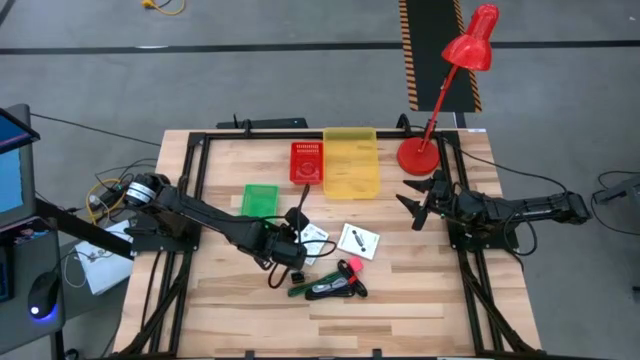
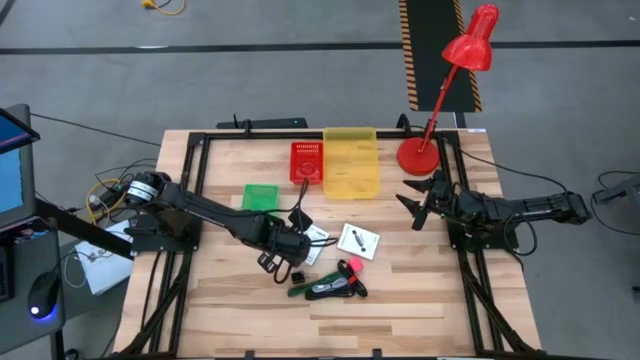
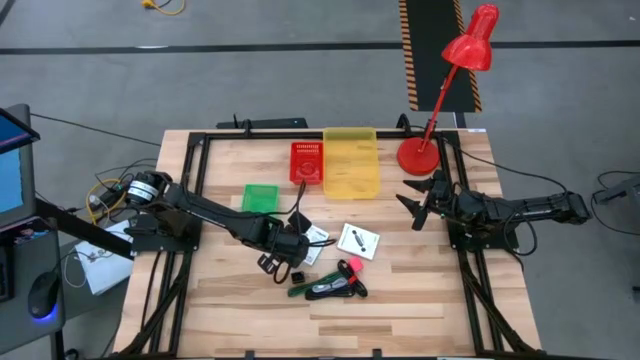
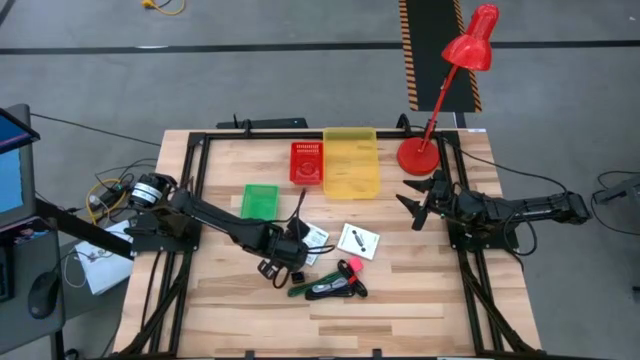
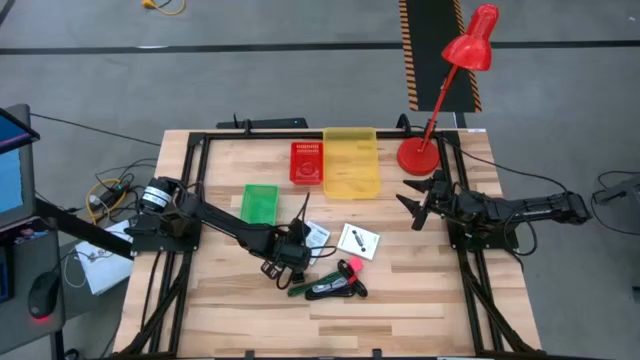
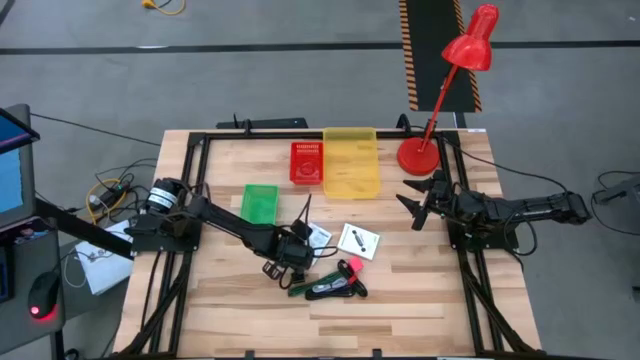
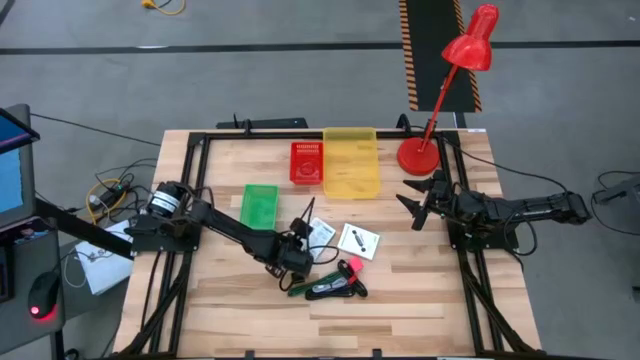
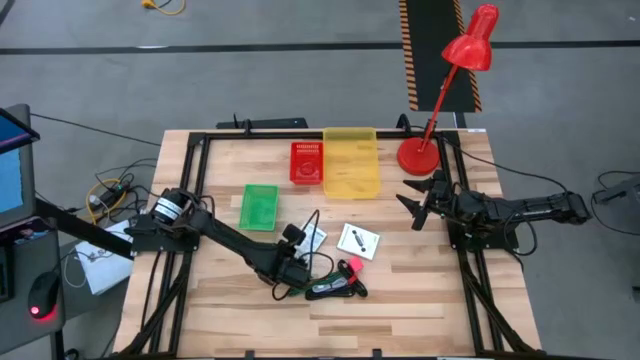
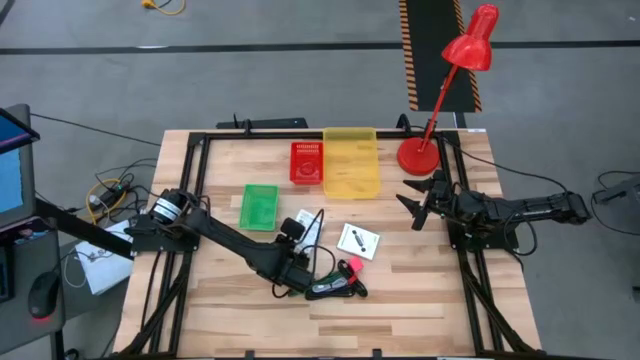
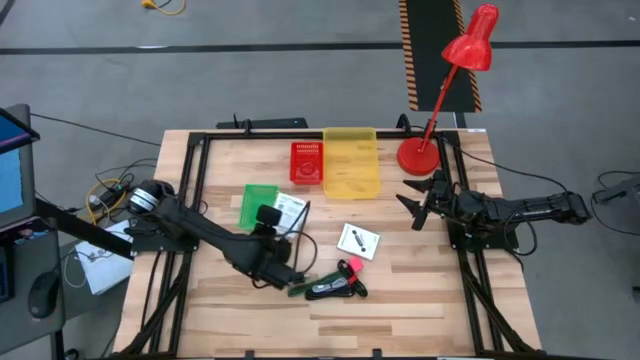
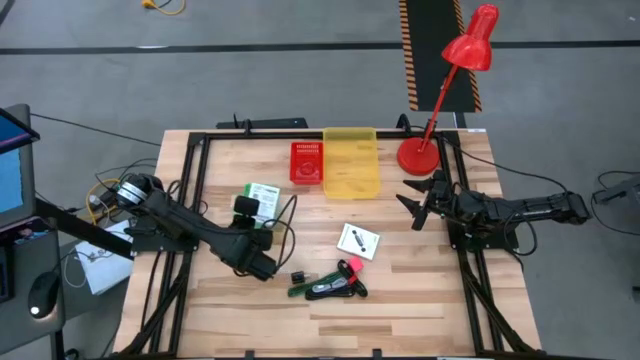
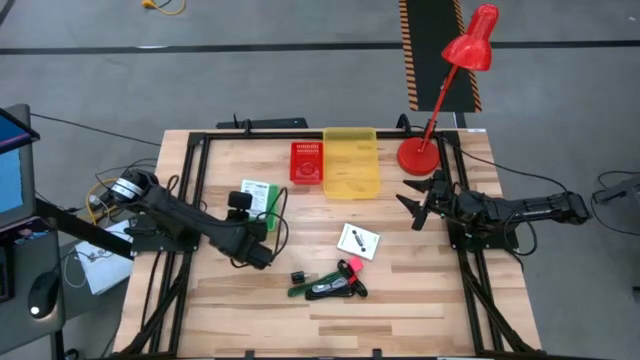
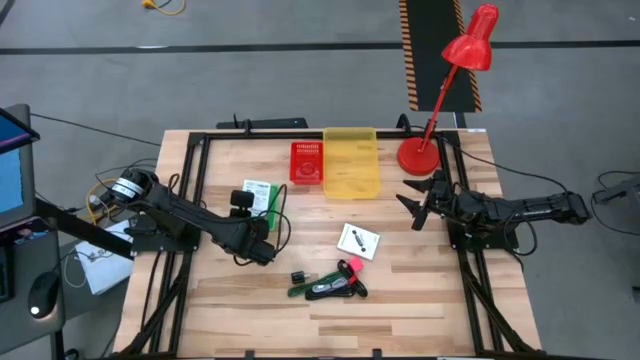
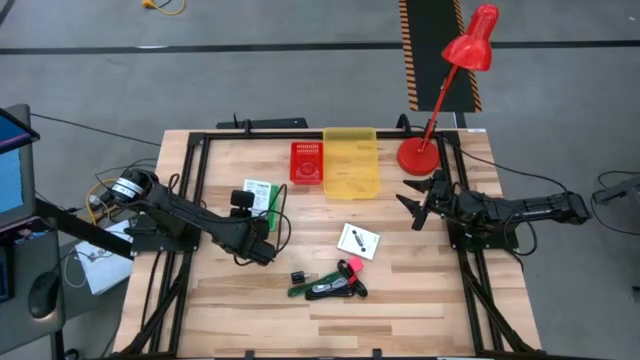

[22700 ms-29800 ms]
Task: Pick and place items into bin
Put the left white card reader box into the green basket

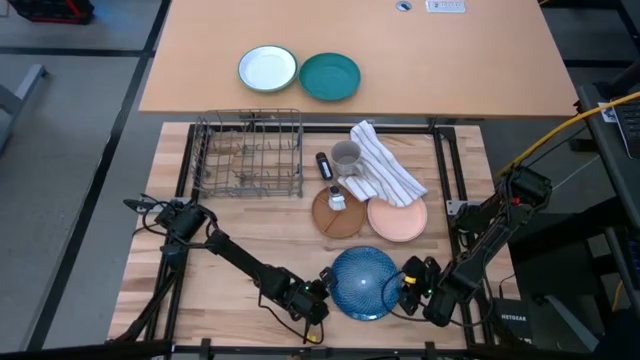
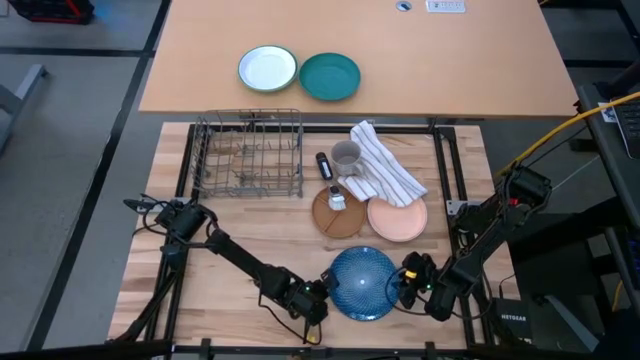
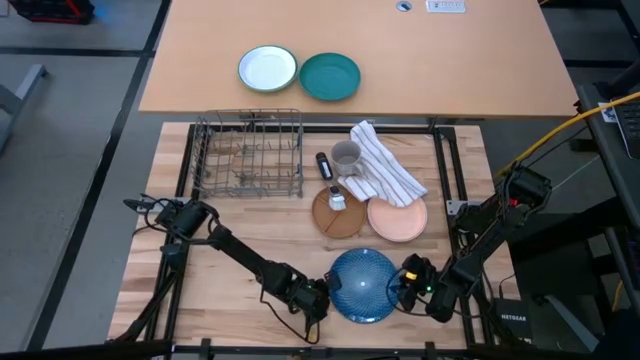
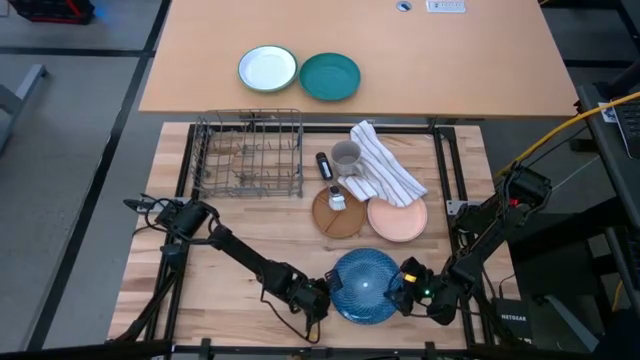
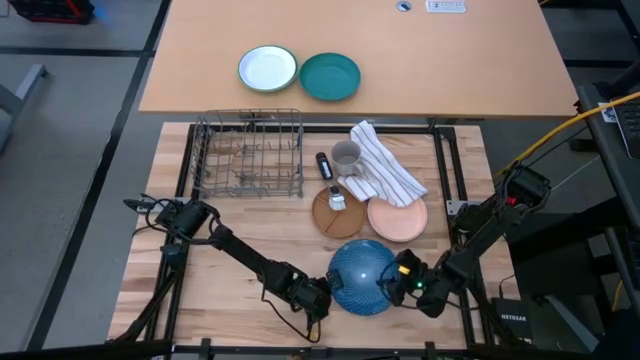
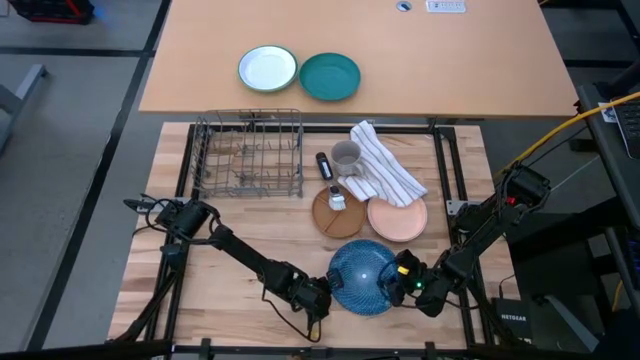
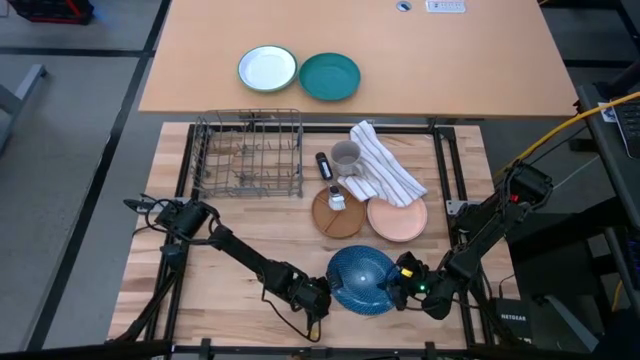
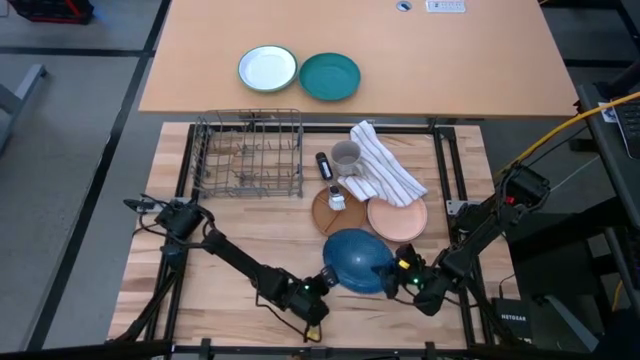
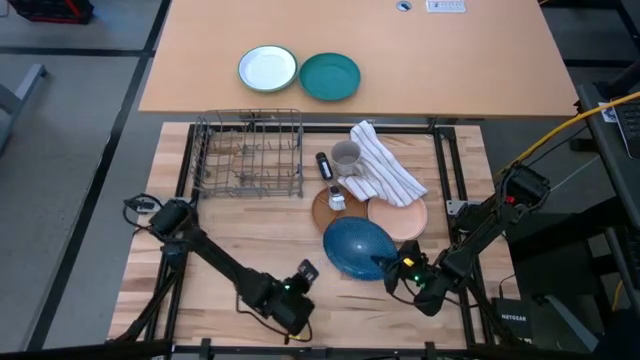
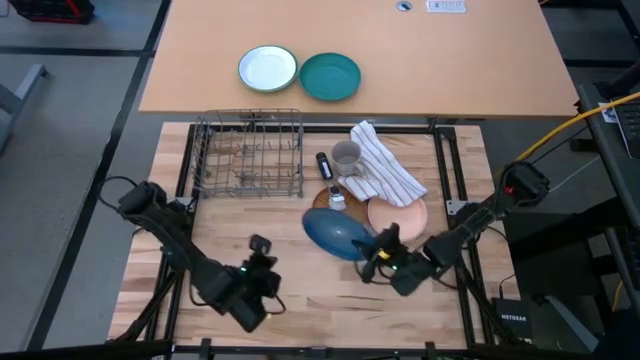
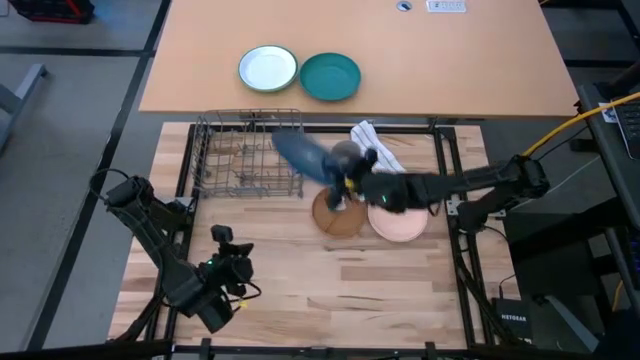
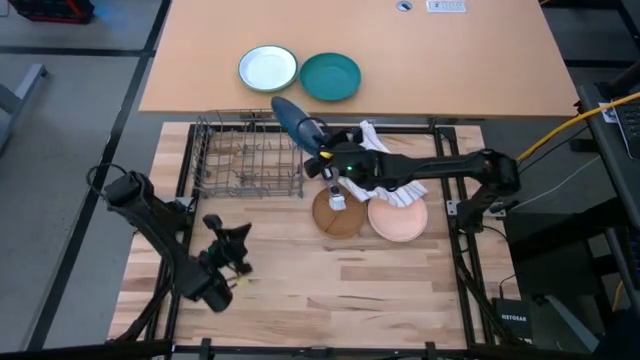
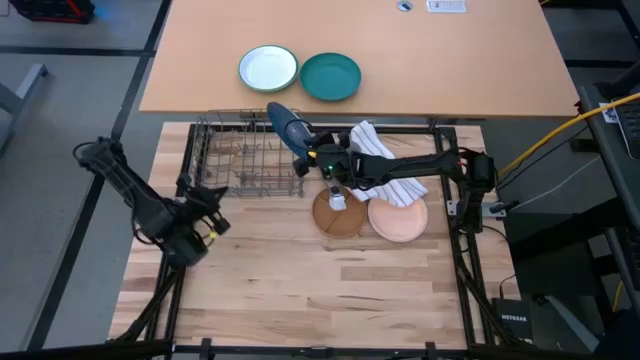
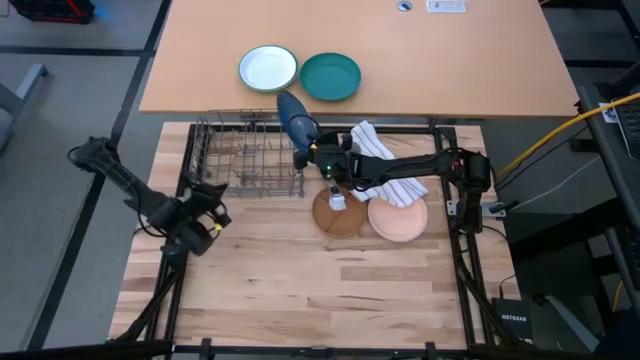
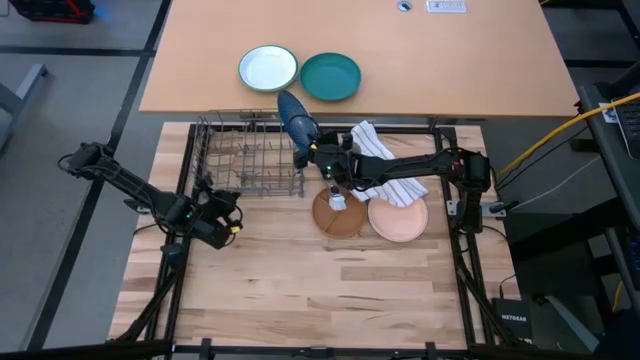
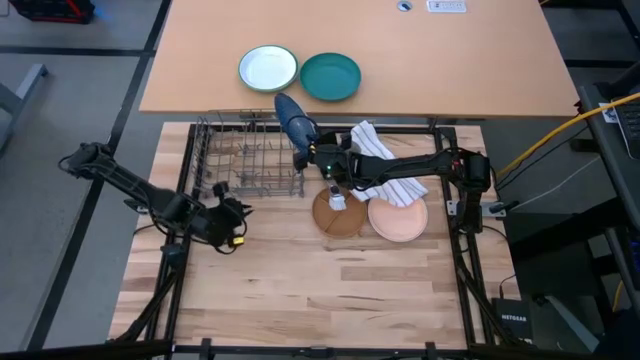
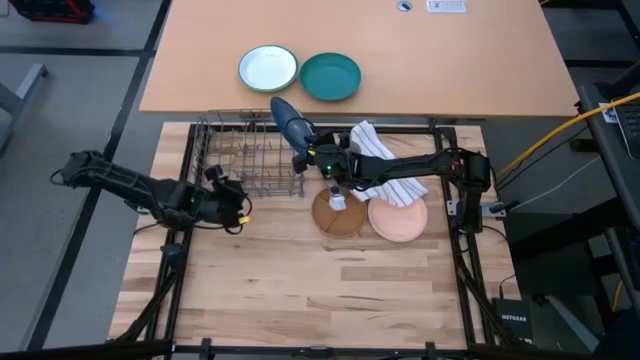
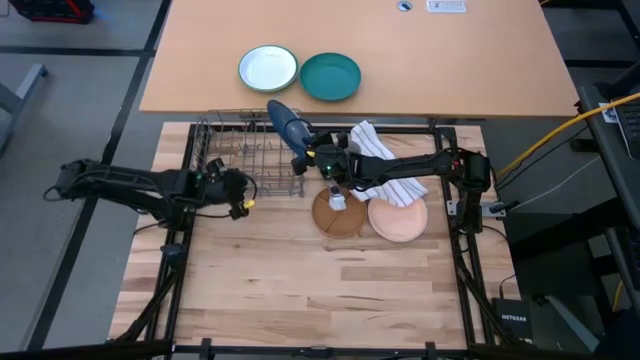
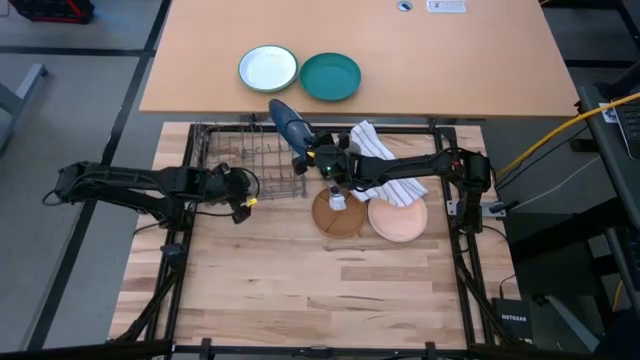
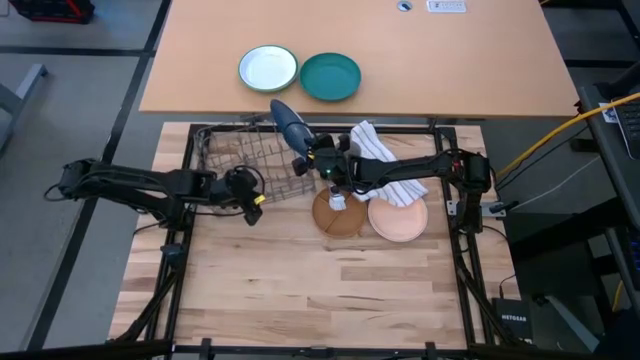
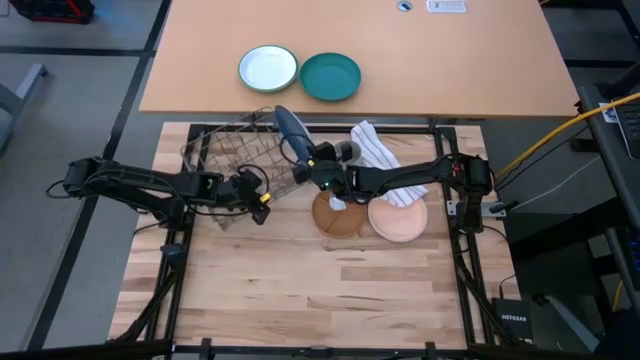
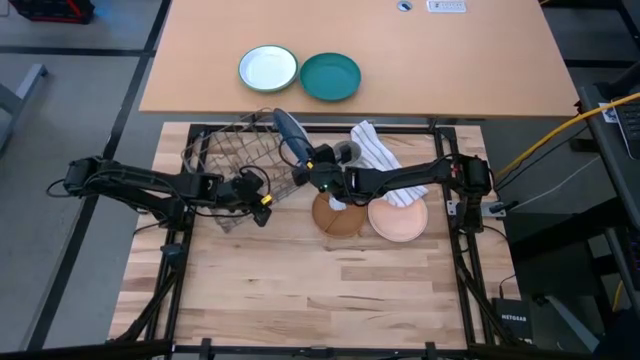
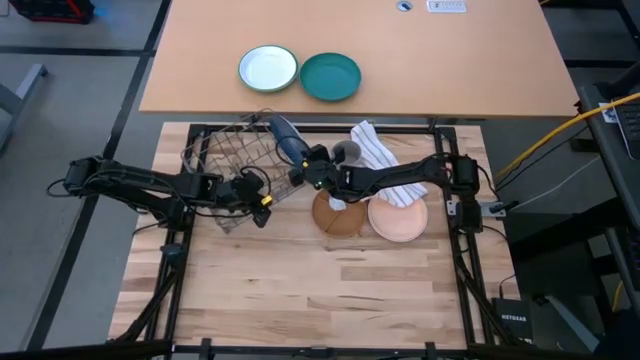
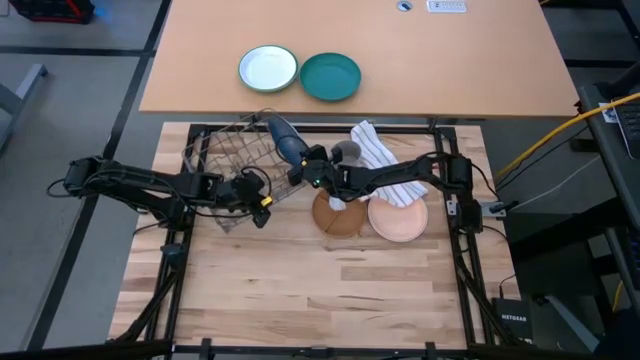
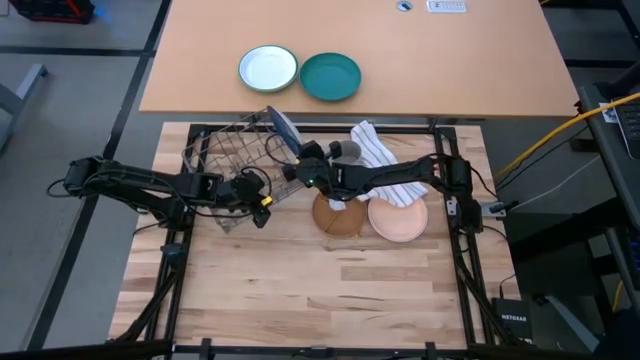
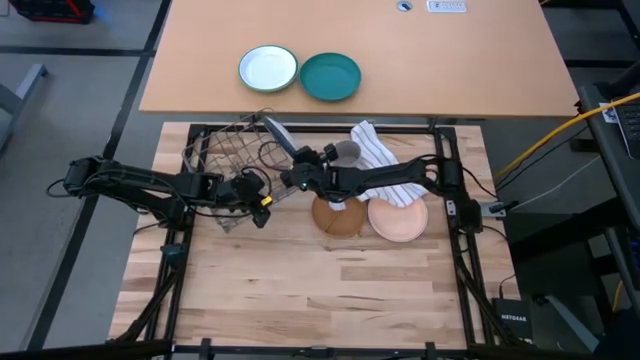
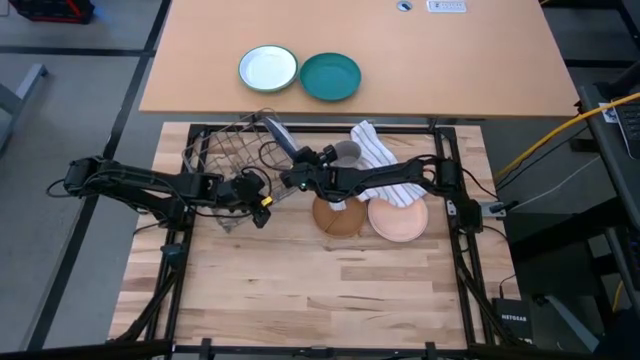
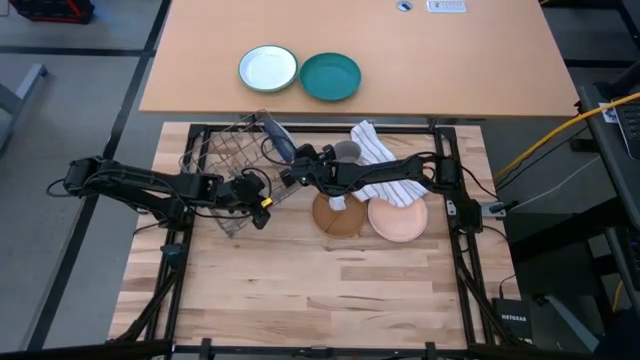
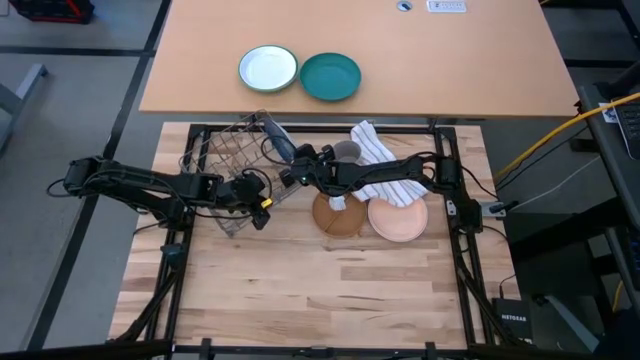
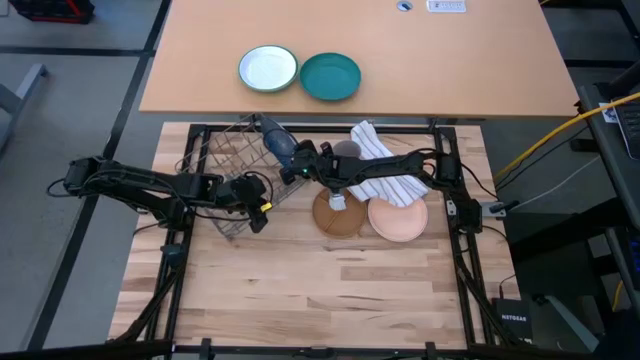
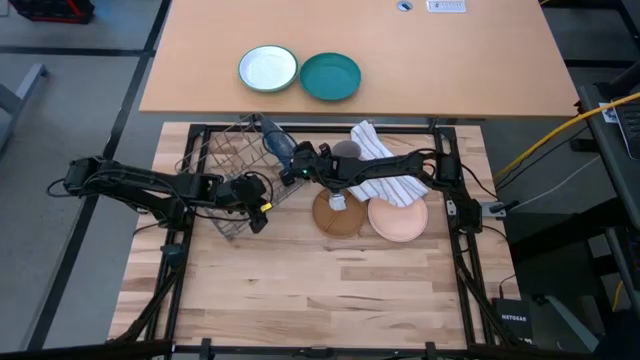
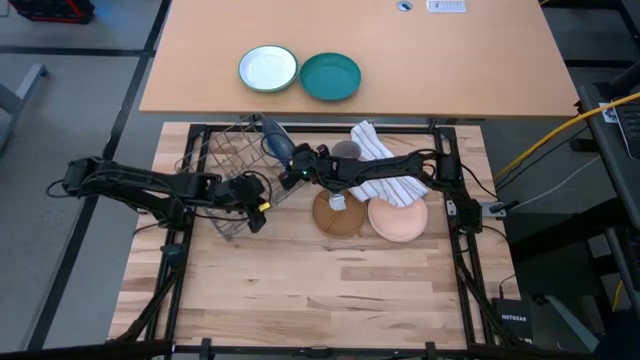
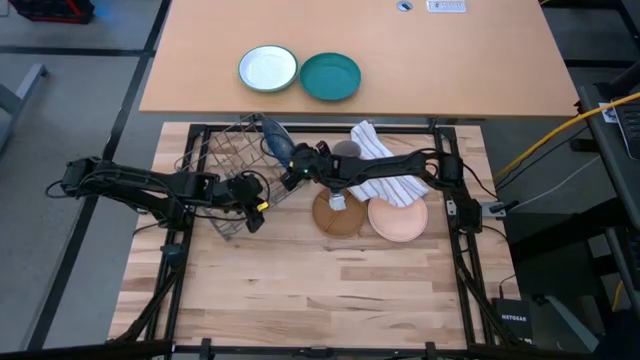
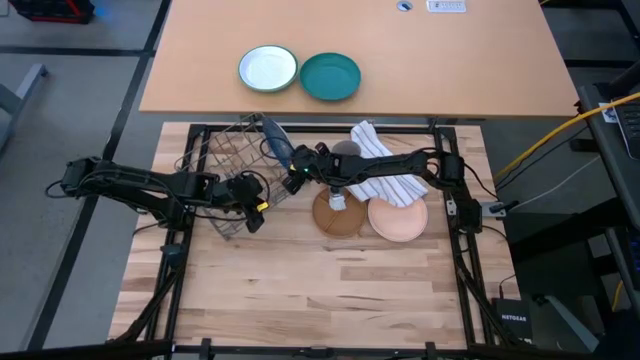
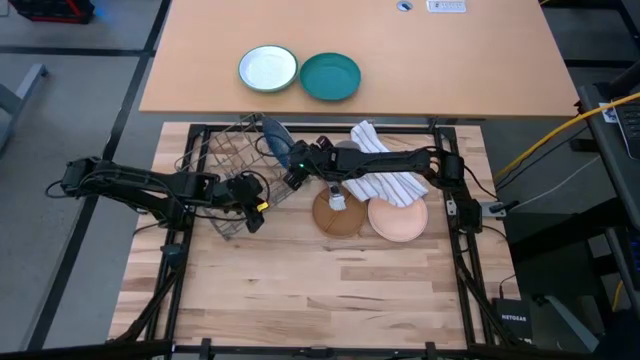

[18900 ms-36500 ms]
Task: Sort dishes
Put the blue plate into the dish rack
